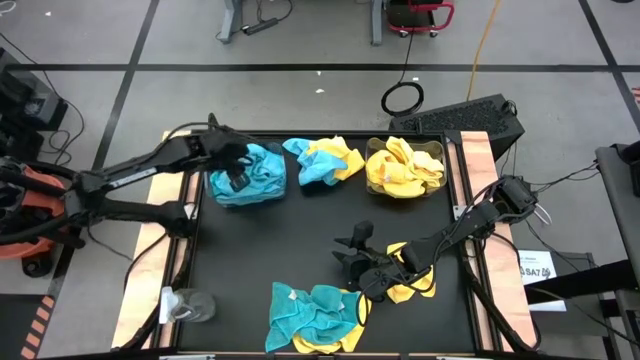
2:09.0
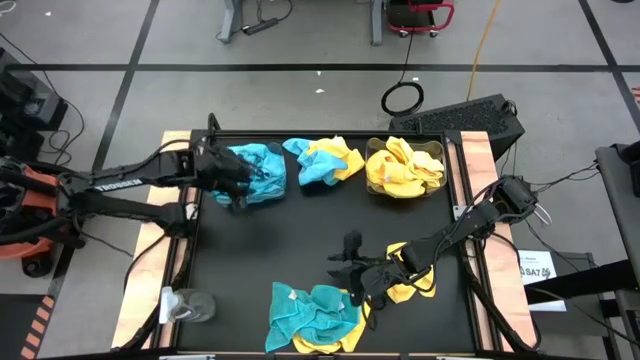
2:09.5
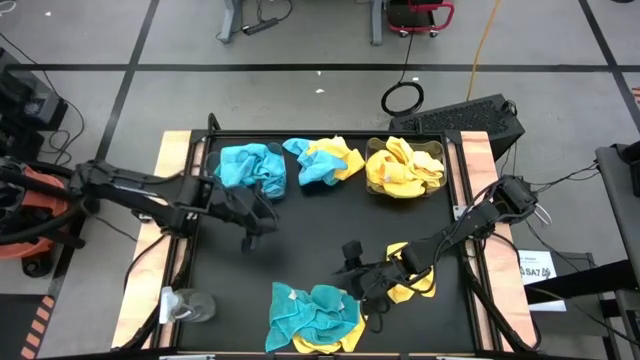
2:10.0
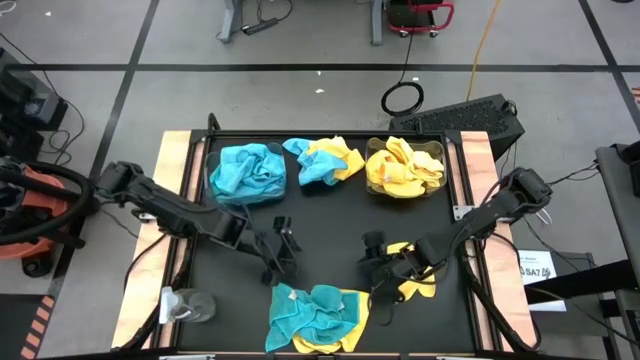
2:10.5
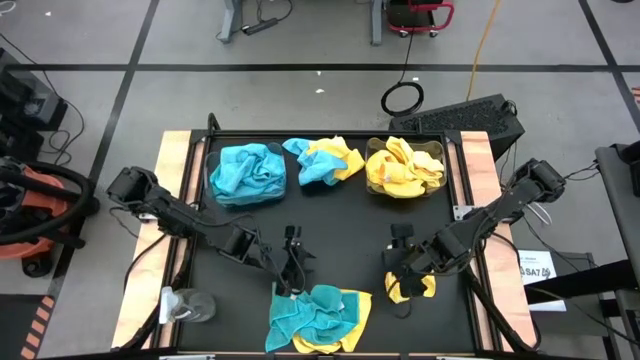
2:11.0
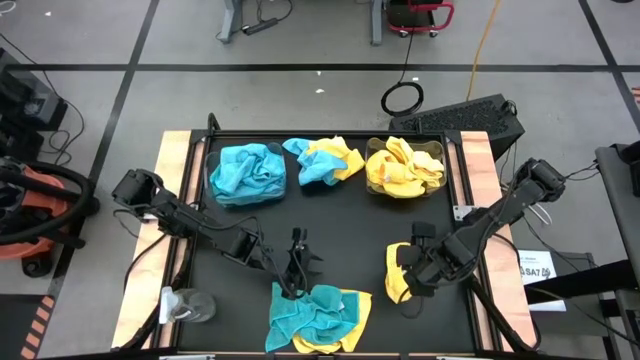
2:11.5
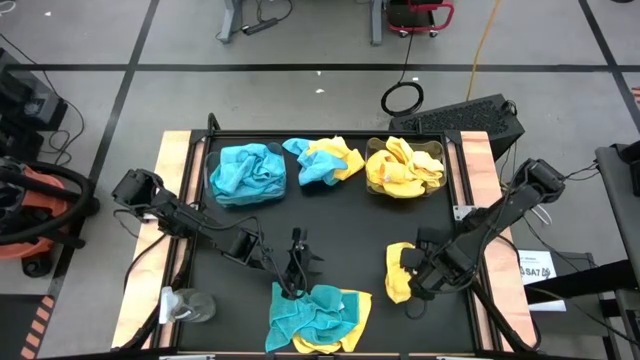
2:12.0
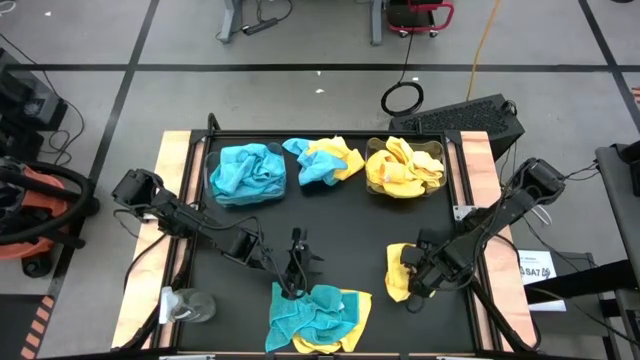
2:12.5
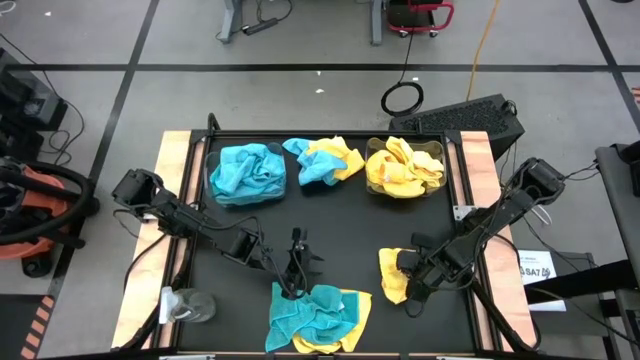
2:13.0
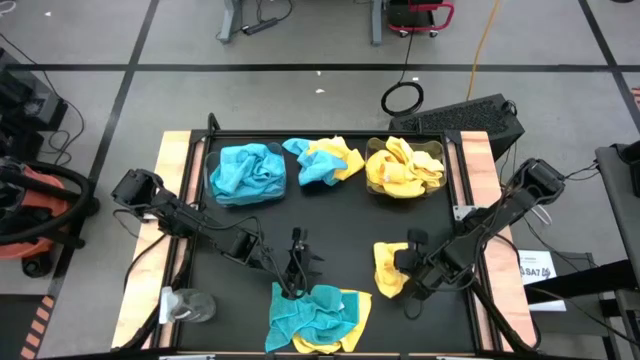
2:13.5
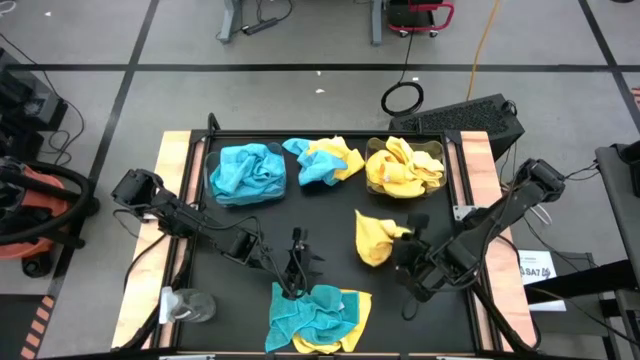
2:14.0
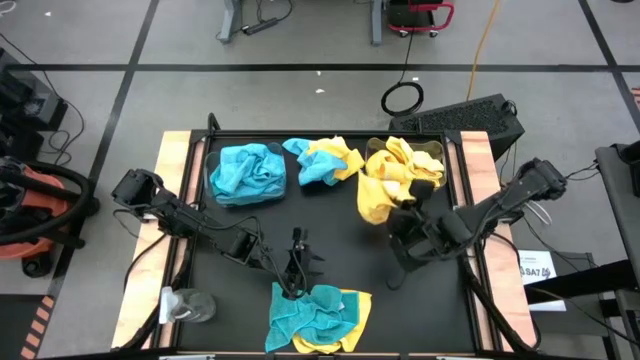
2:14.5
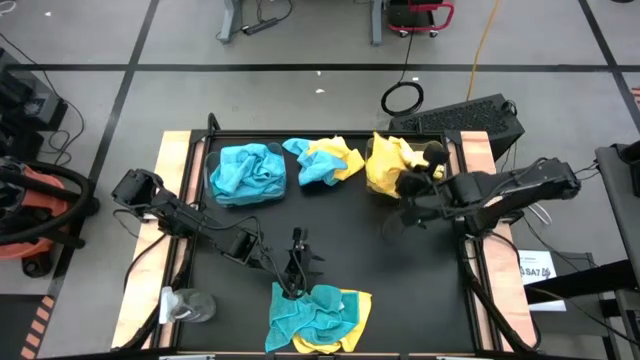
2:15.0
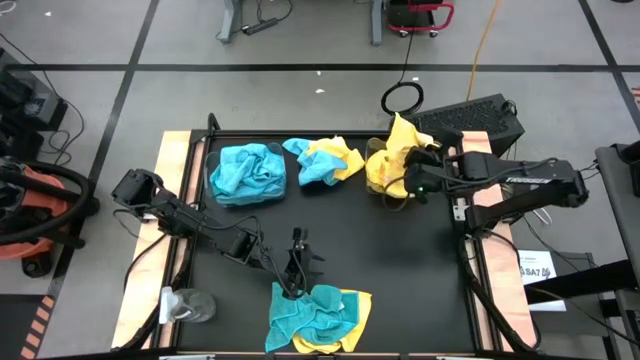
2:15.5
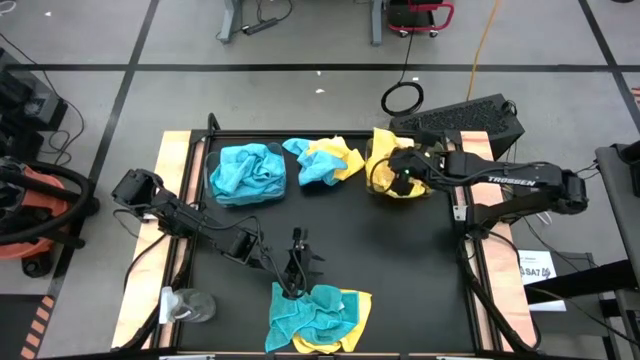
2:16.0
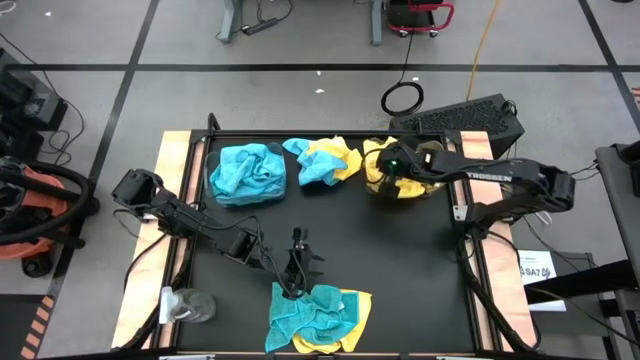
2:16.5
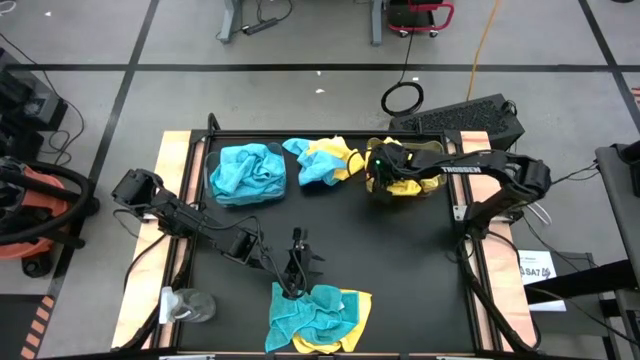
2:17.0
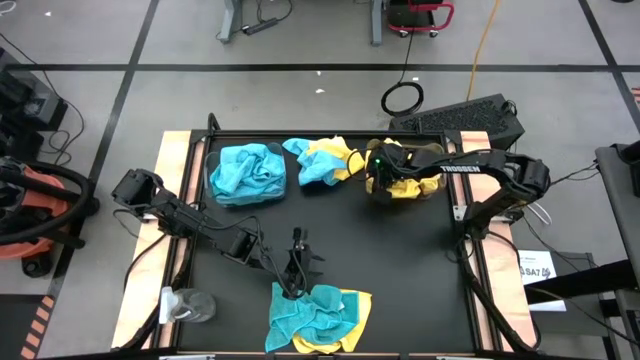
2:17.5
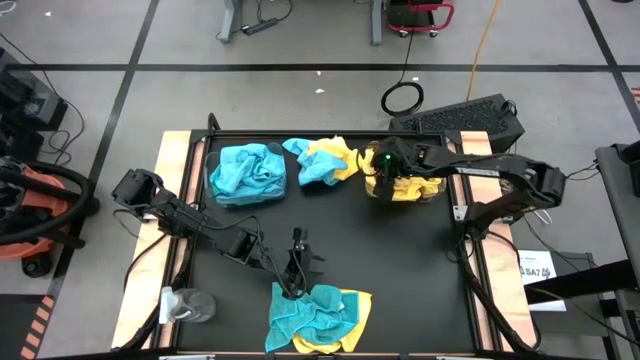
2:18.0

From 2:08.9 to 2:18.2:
Task: Sort microfiber towel by color & place in baskets
Put the yellow microfiber cloth into the right transparent bin

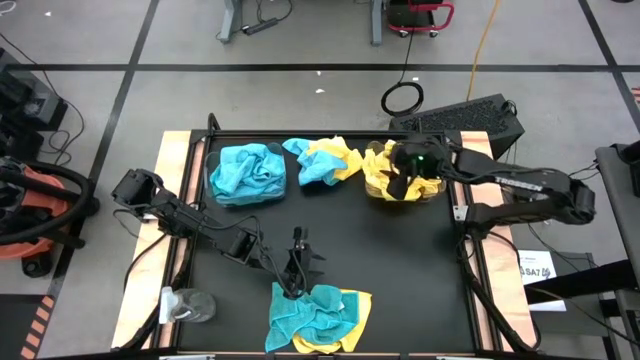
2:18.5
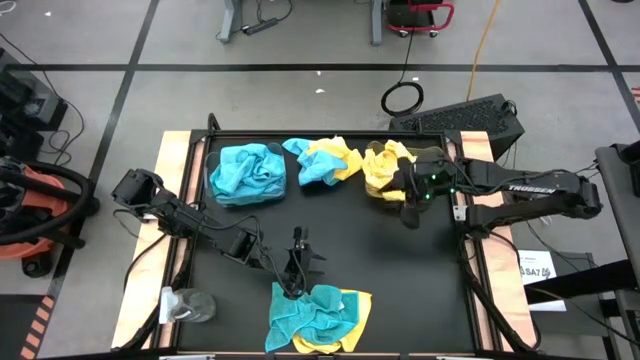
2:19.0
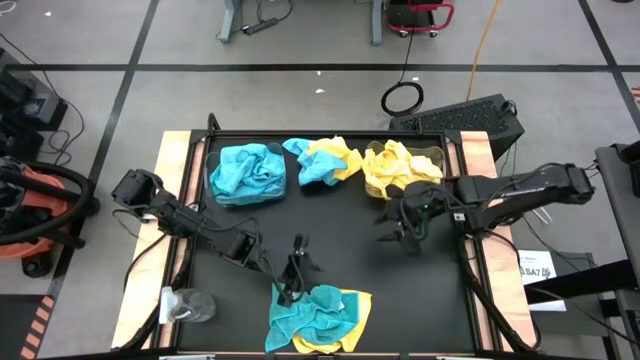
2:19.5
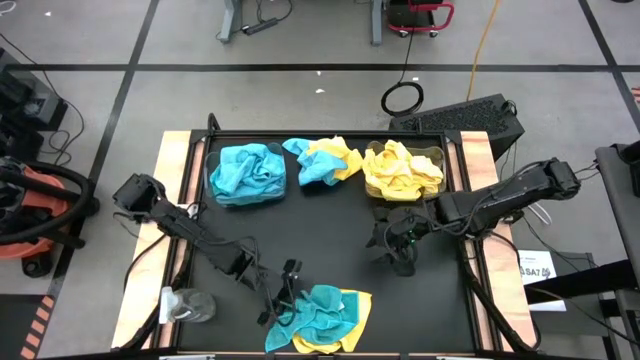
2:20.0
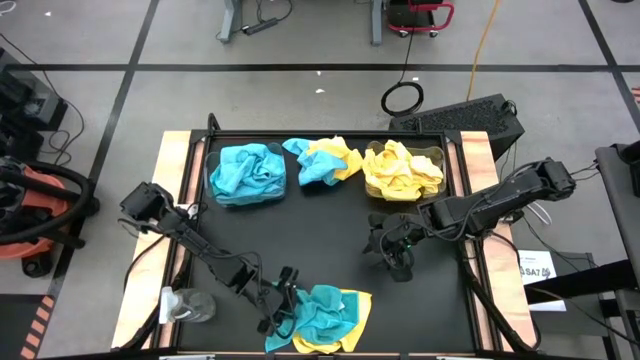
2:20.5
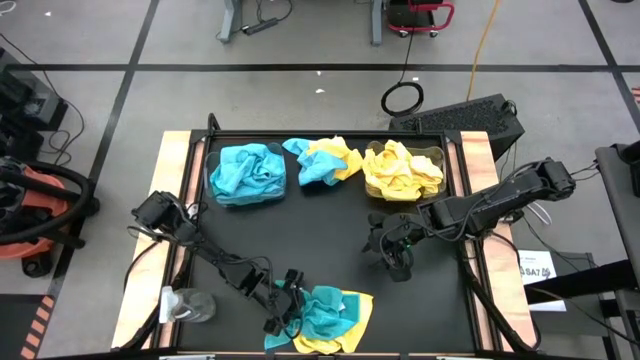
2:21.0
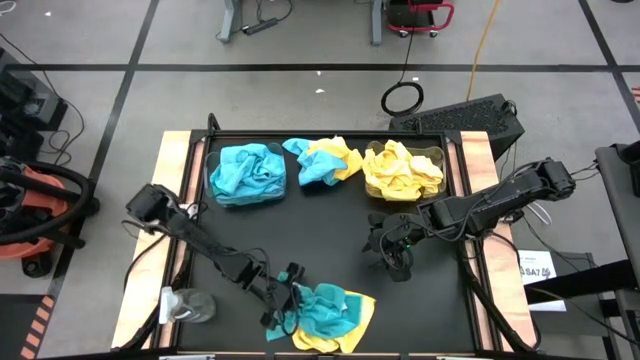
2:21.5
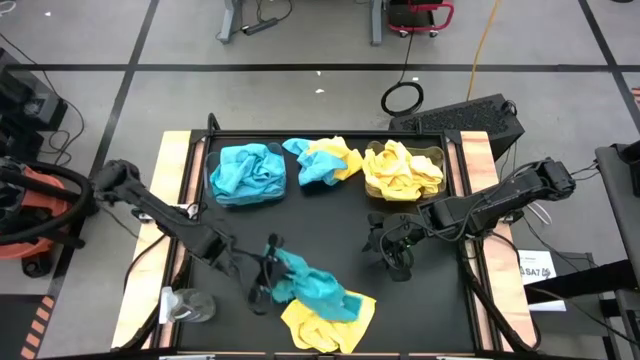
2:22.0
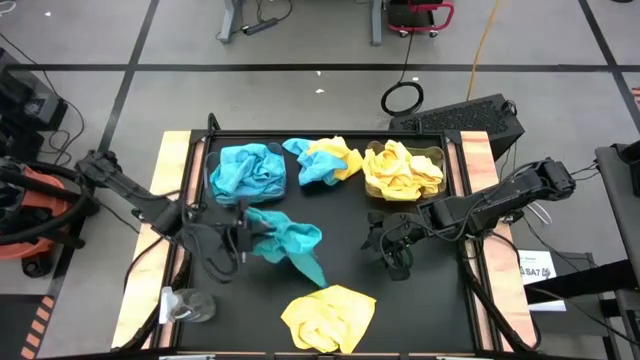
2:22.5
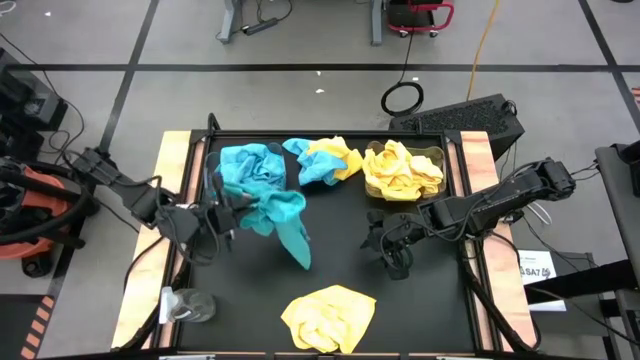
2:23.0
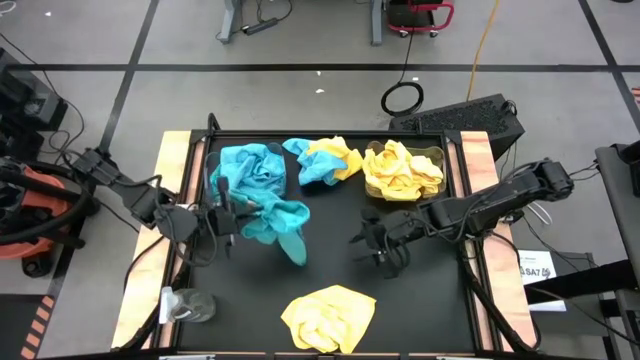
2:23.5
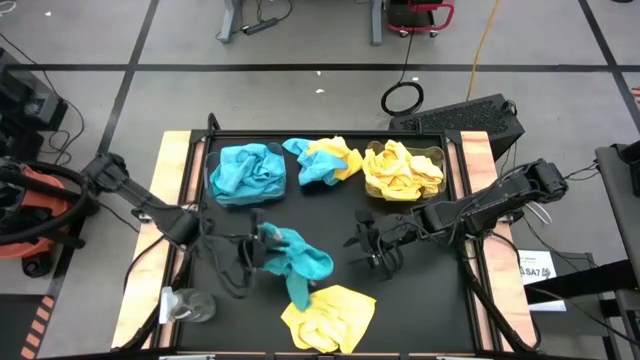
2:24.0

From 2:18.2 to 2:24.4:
Put the blue microfiber cloth into the left transparent bin

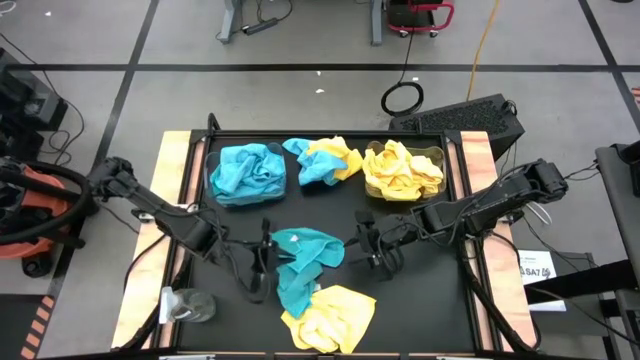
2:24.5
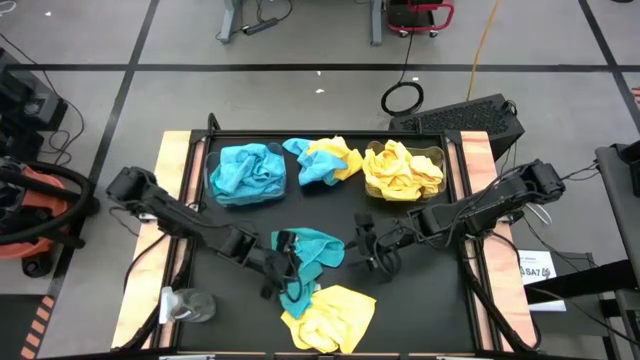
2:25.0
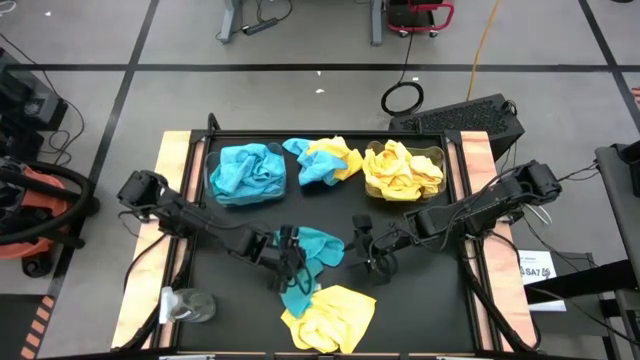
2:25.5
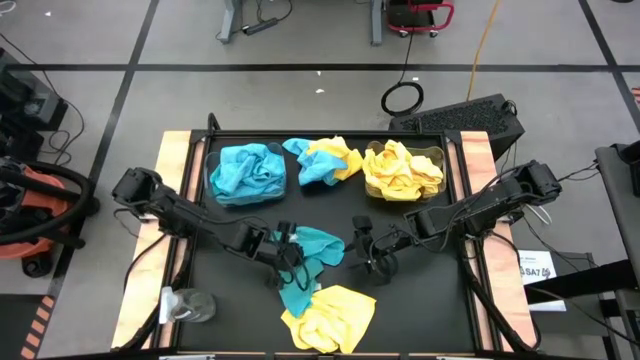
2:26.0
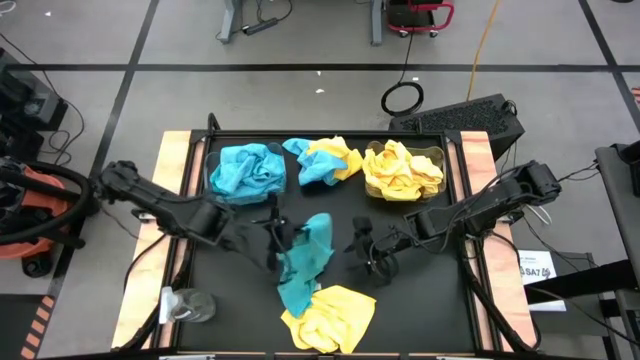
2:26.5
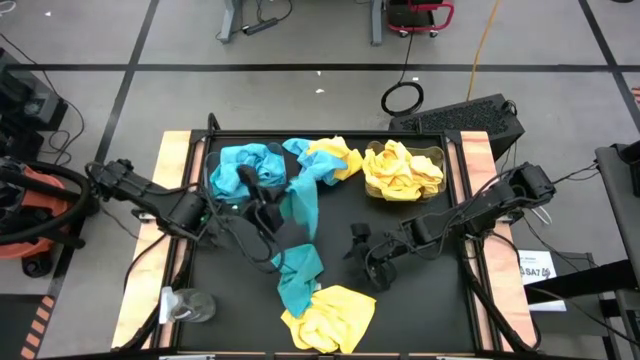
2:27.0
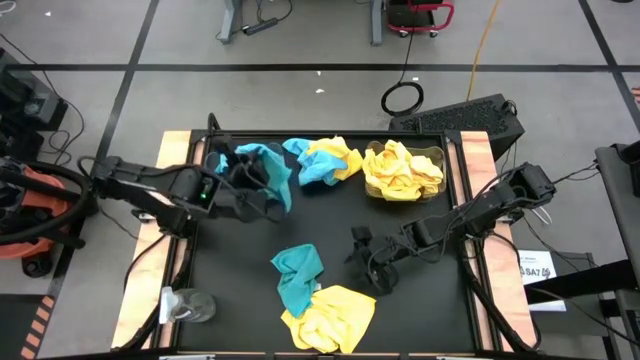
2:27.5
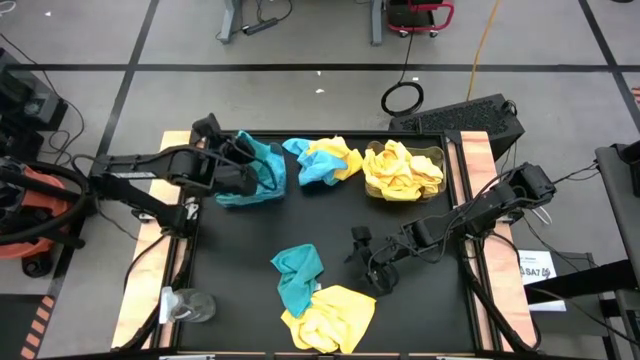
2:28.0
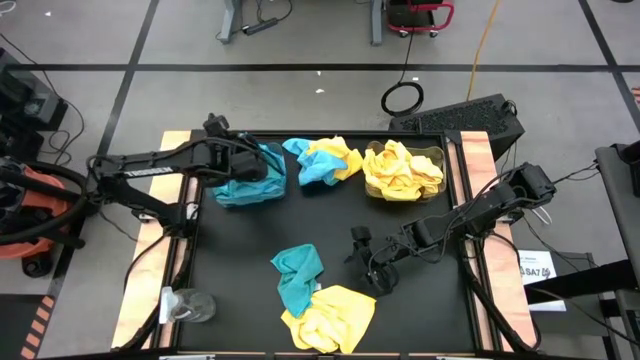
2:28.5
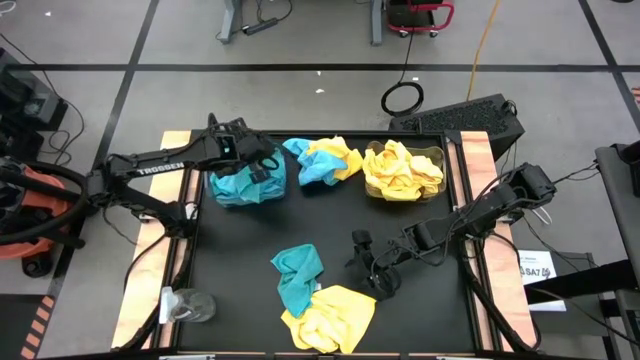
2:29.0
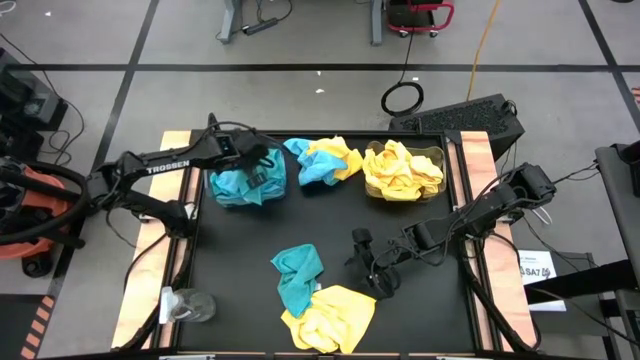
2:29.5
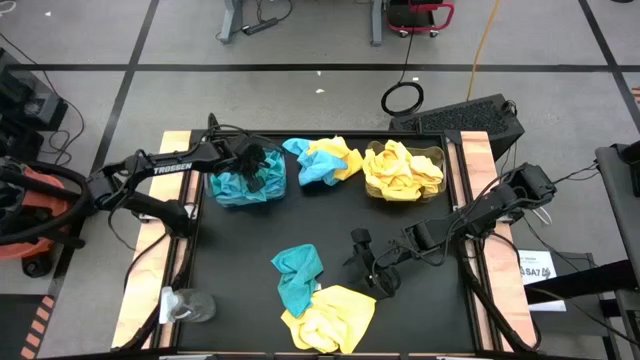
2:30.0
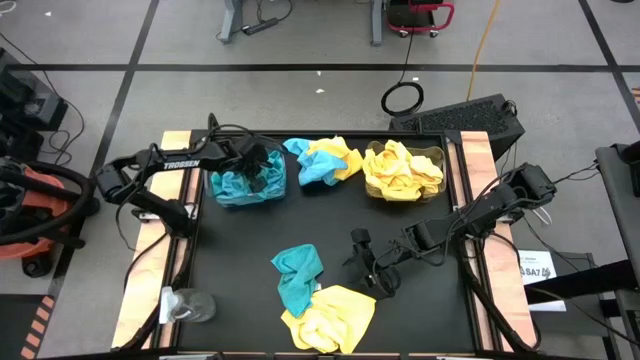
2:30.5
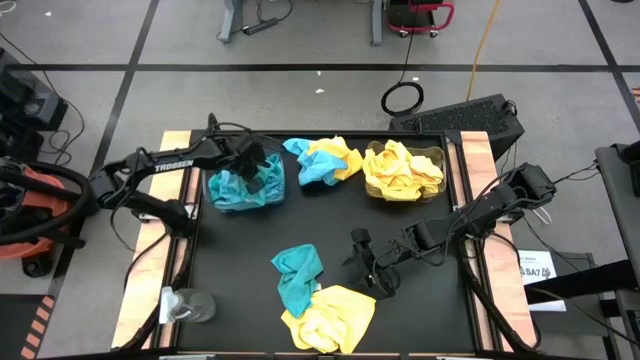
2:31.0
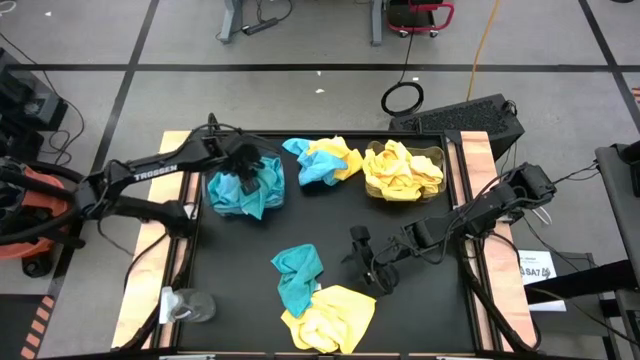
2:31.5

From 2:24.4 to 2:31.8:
Put the blue microfiber cloth into the left transparent bin
